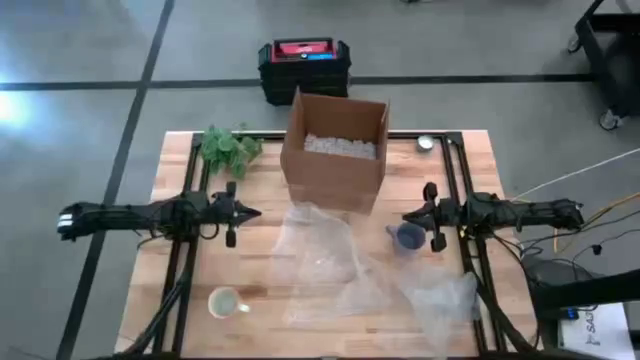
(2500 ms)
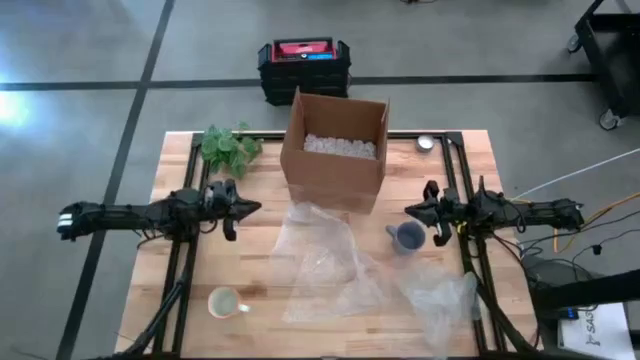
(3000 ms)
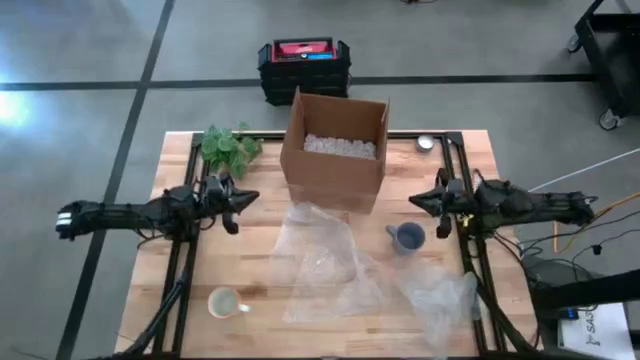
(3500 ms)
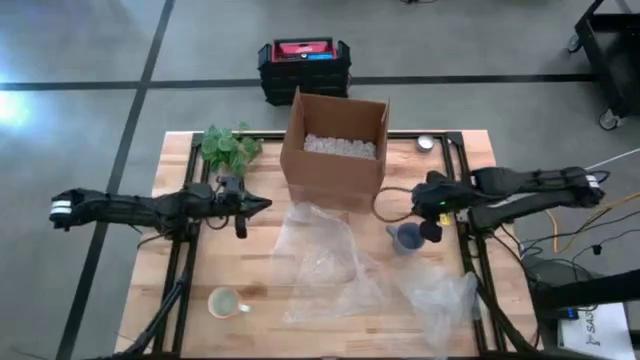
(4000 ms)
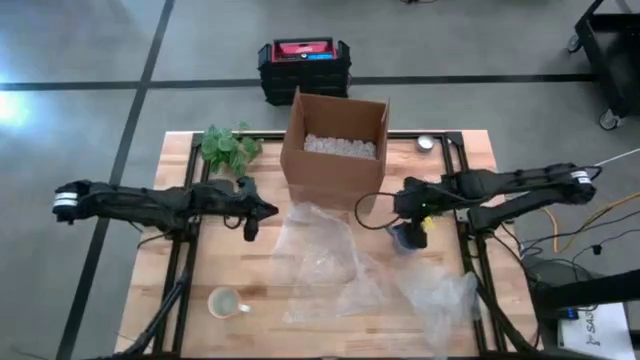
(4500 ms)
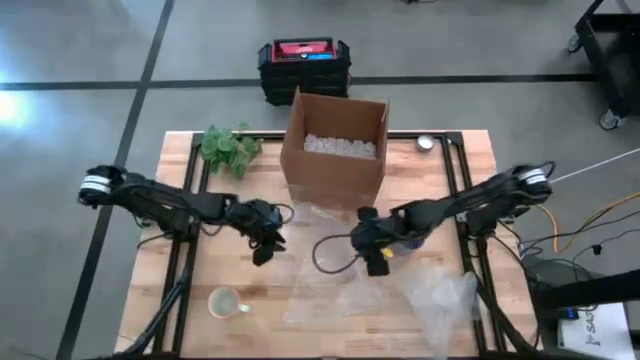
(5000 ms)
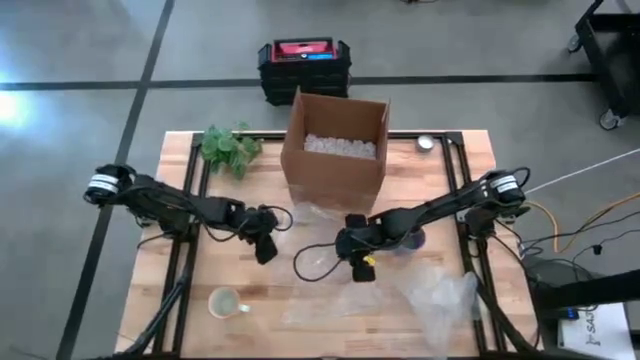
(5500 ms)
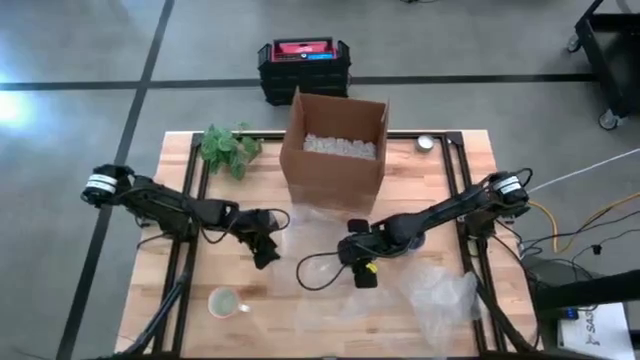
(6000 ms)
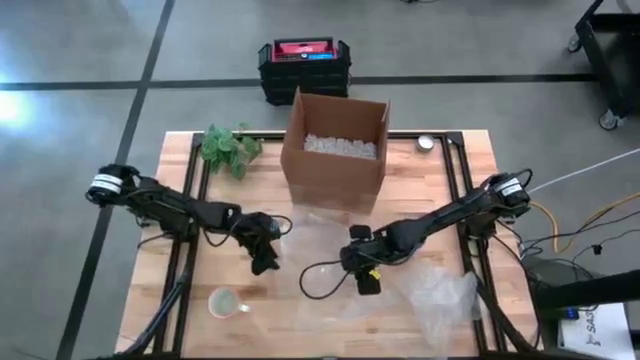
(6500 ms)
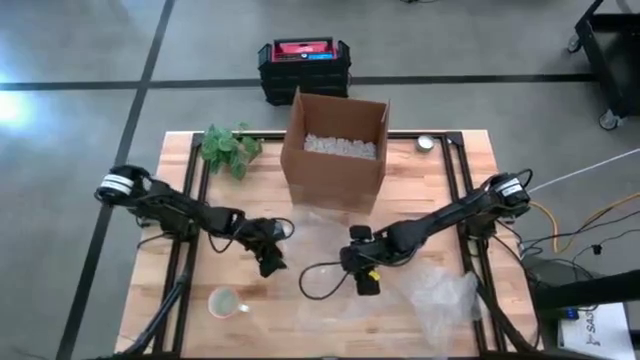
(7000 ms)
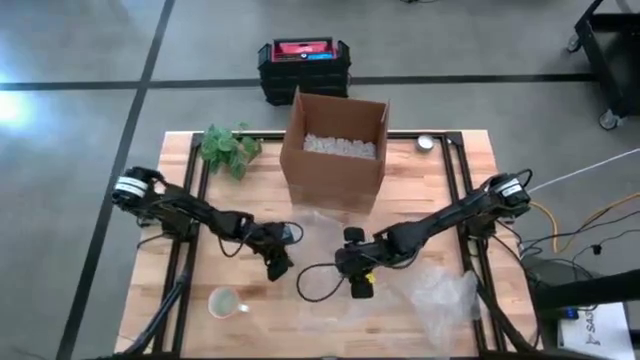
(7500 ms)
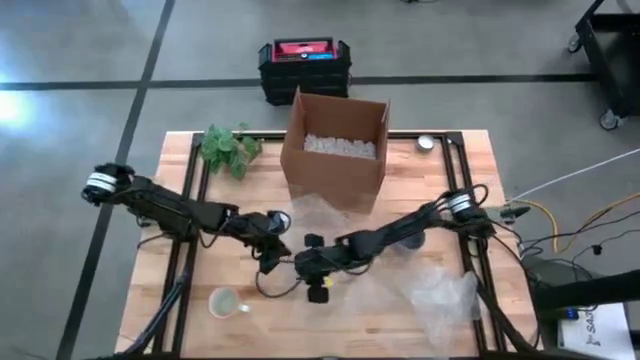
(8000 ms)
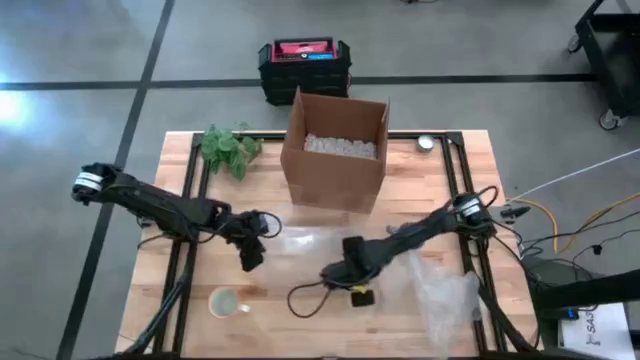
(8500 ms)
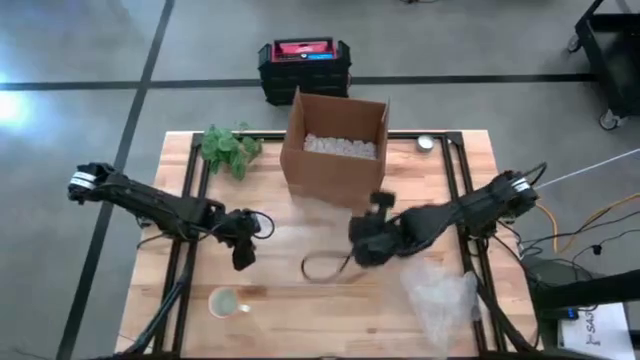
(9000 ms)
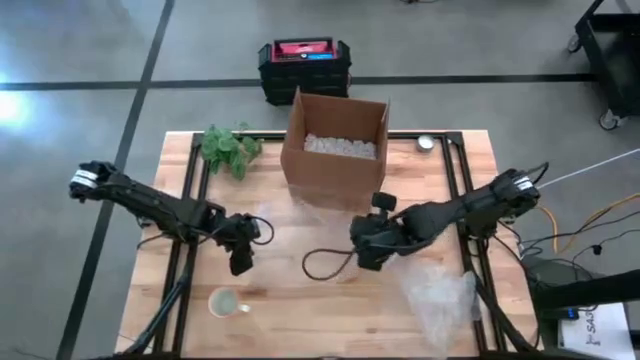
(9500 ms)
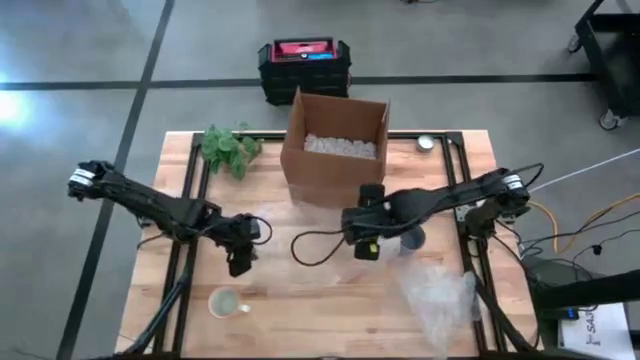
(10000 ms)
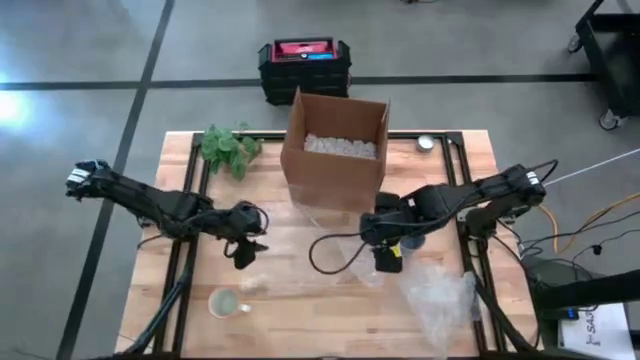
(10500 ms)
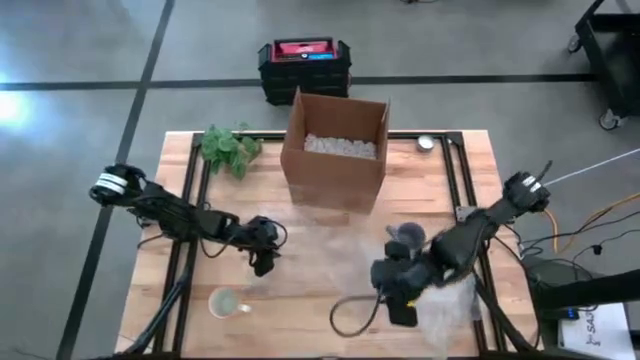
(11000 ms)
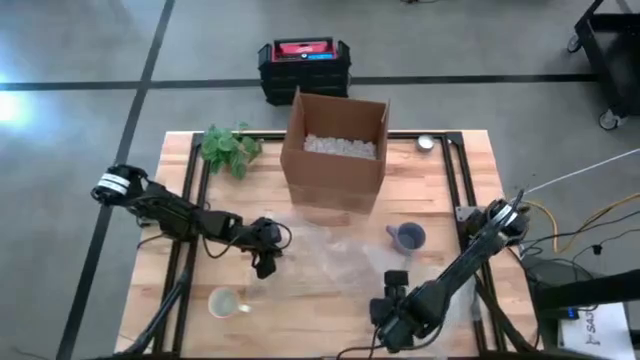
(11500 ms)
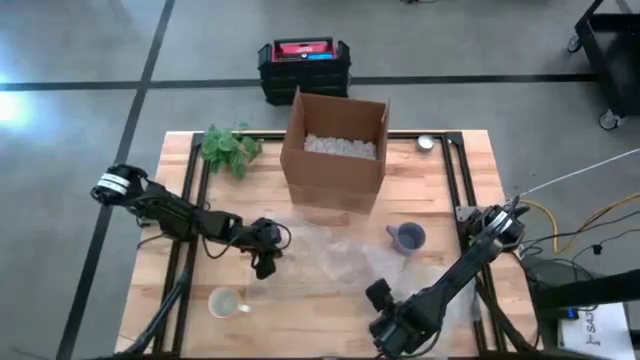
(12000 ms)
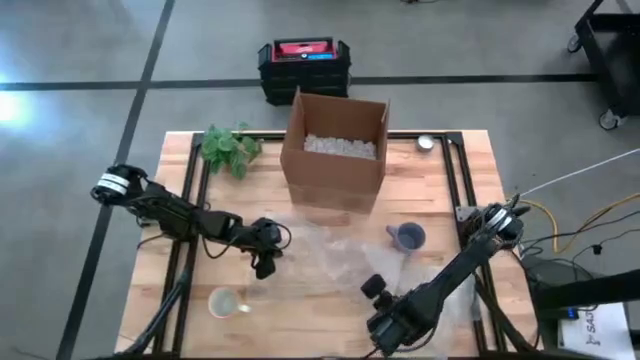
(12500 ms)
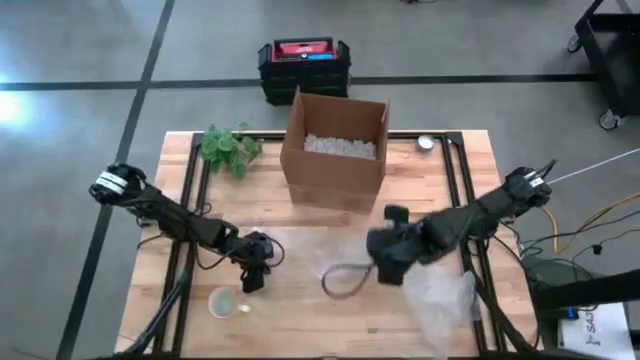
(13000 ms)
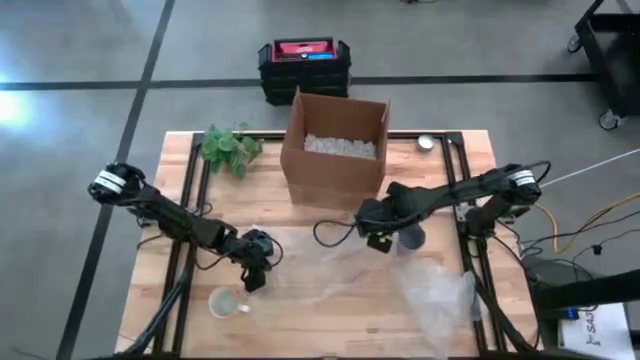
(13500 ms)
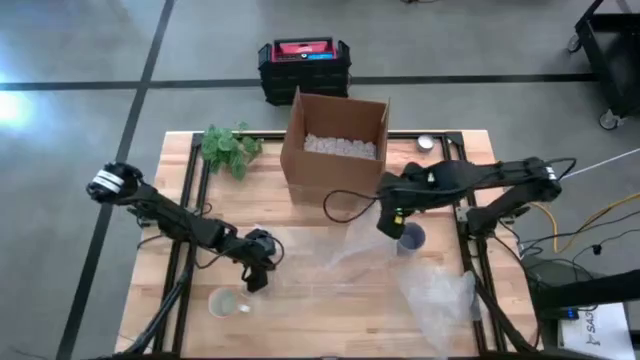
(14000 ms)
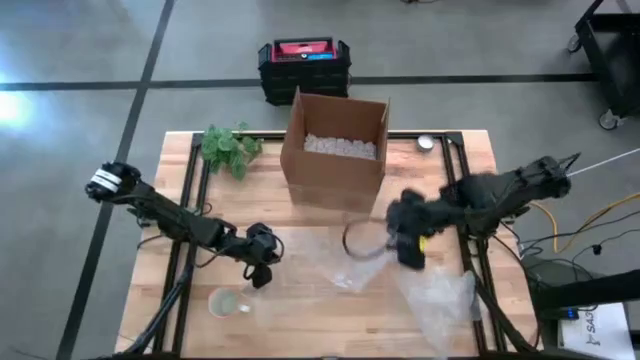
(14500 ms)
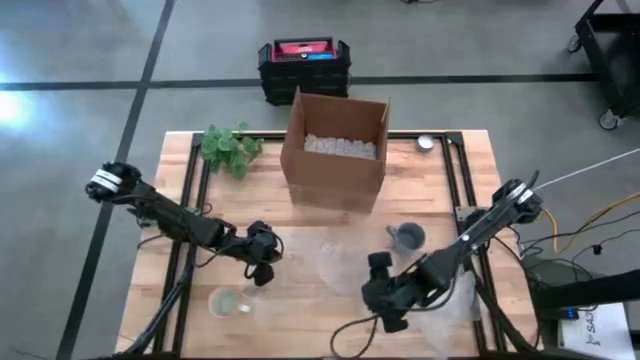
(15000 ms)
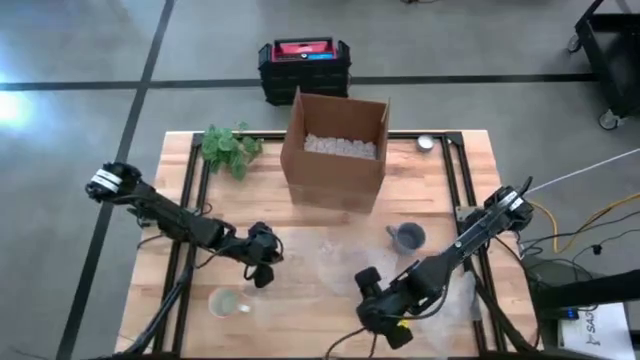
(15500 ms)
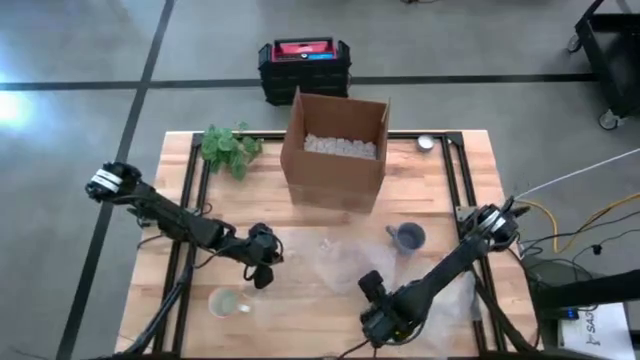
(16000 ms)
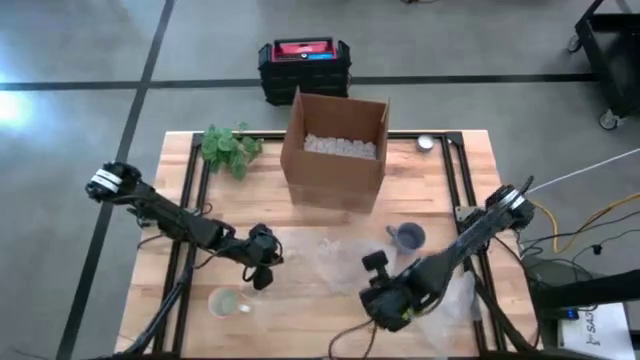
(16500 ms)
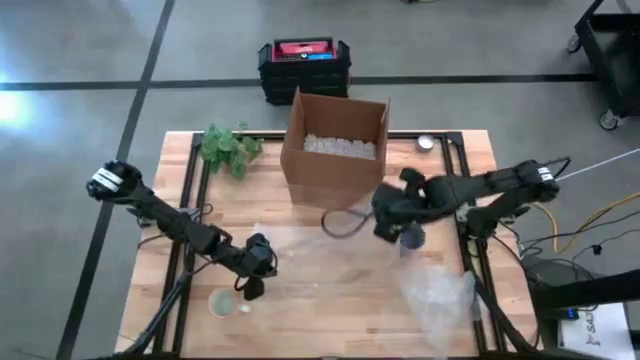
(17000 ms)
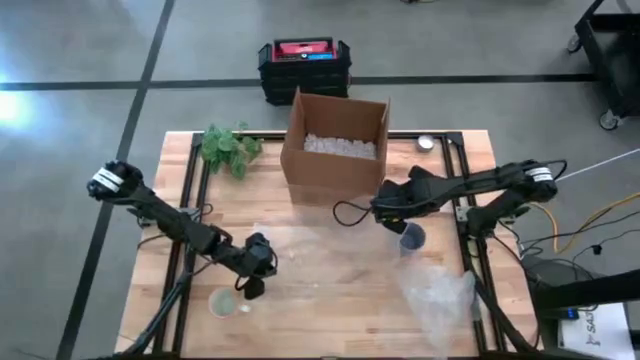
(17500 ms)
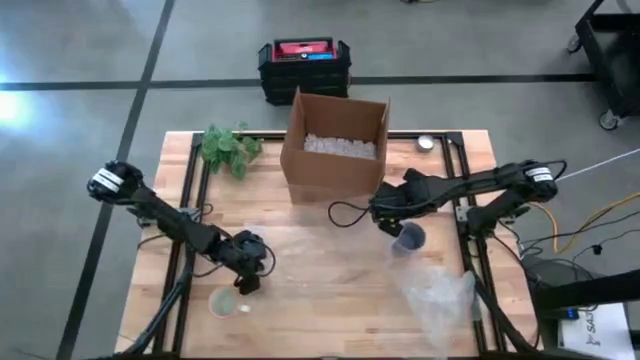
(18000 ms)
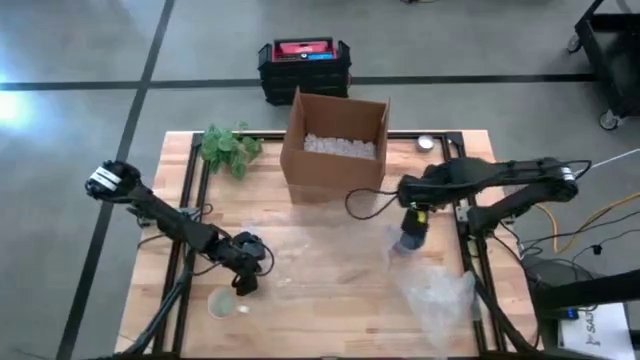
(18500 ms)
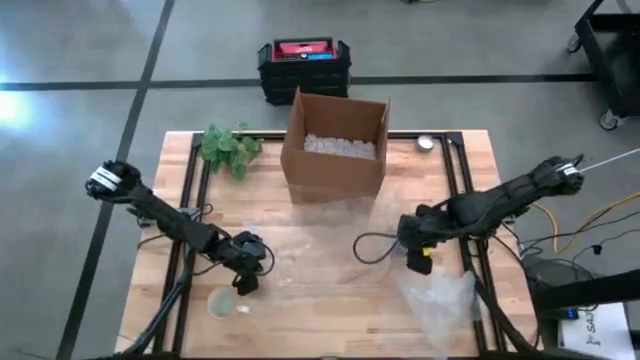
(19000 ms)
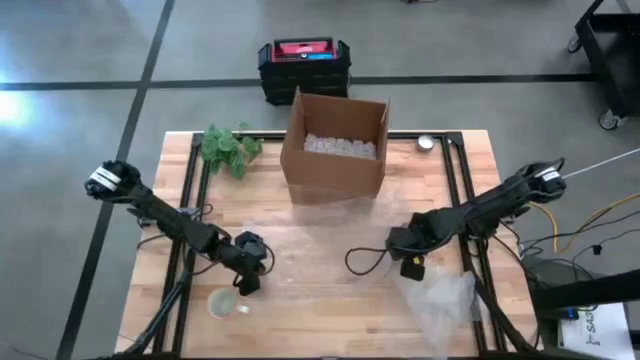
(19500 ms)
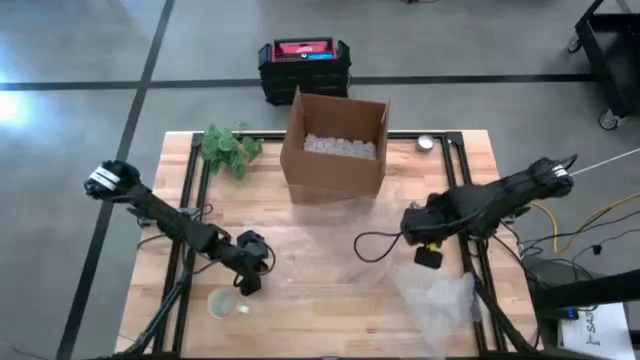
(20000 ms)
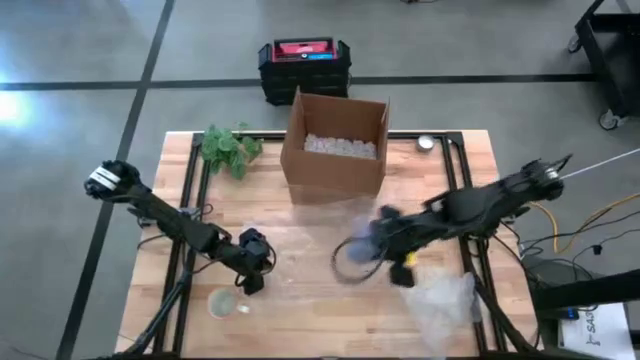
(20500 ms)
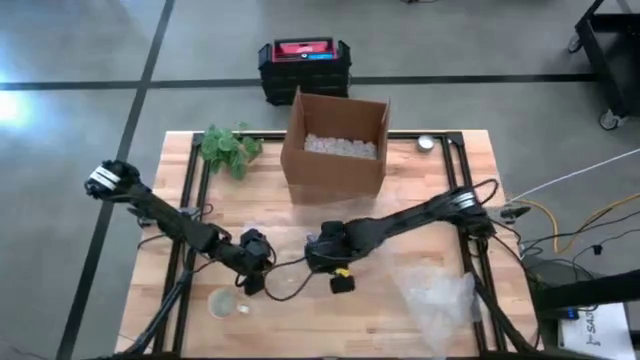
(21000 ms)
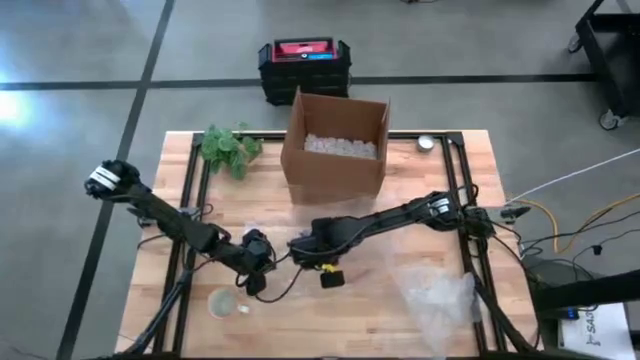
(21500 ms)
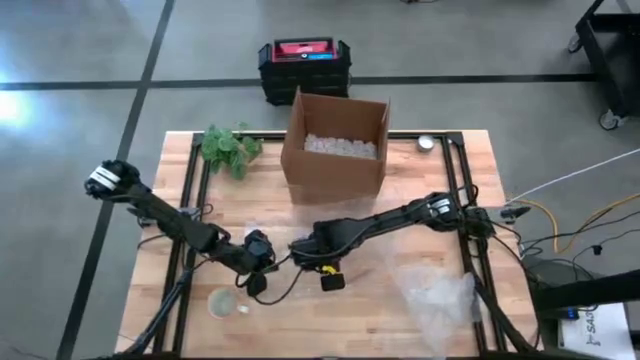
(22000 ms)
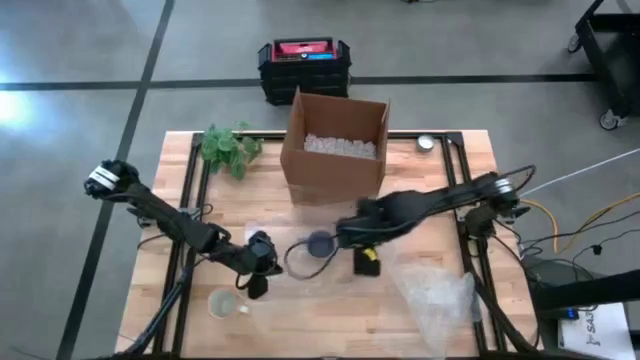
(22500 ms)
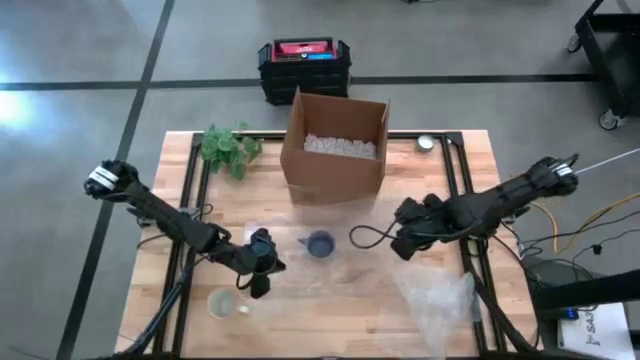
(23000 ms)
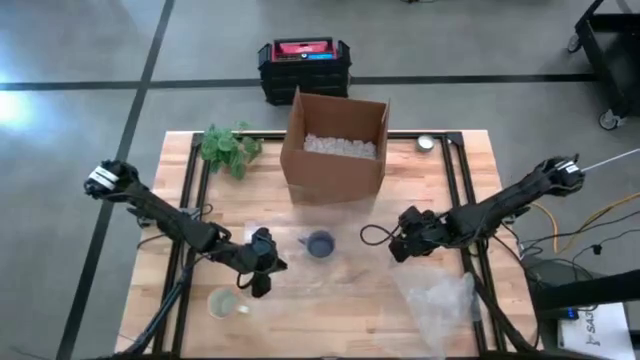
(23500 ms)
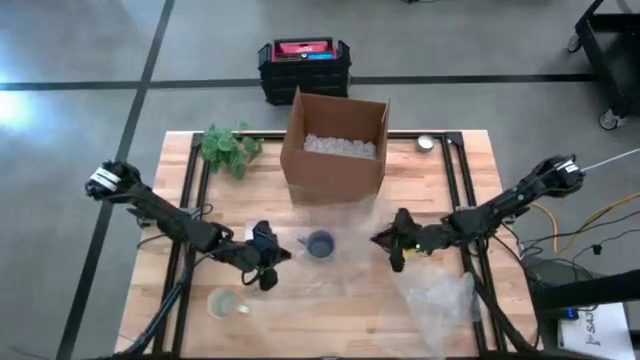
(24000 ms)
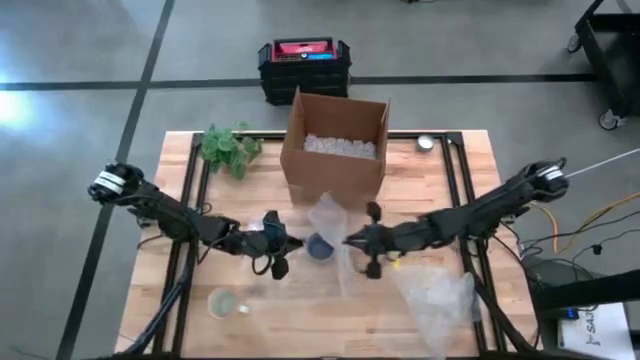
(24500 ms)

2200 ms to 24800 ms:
Task: wrap mug
Wrap the blue cup in bubble wrap
